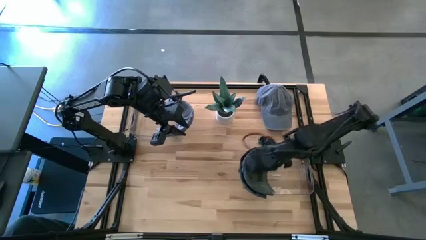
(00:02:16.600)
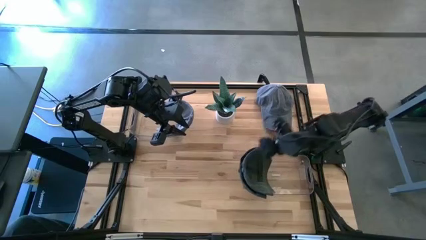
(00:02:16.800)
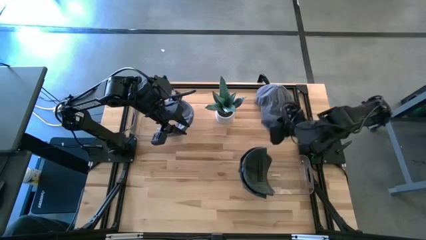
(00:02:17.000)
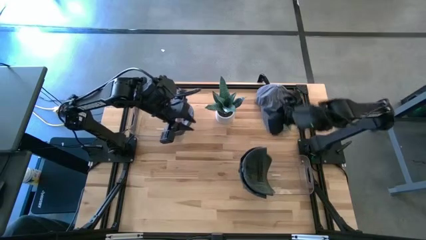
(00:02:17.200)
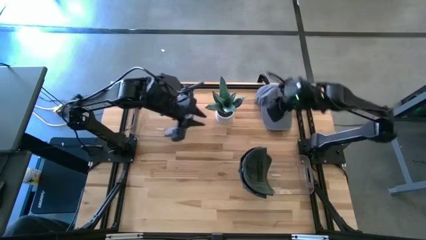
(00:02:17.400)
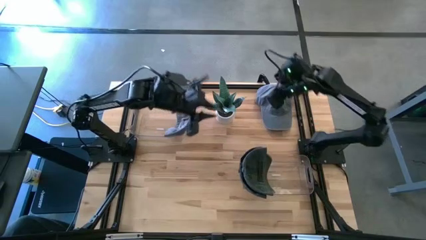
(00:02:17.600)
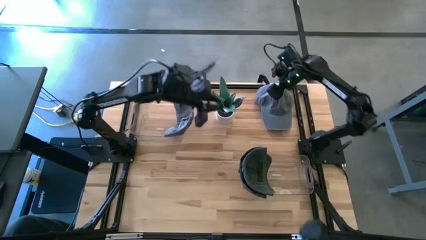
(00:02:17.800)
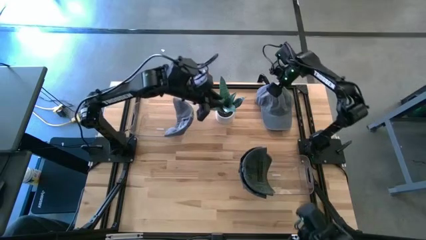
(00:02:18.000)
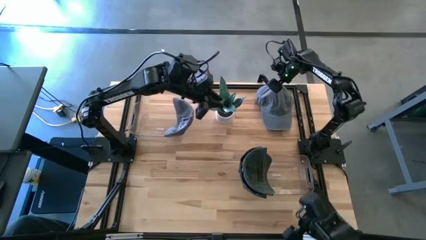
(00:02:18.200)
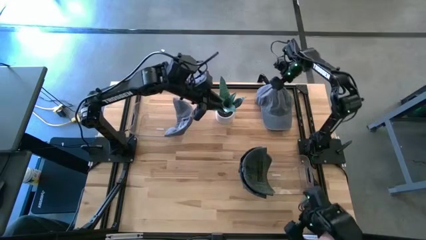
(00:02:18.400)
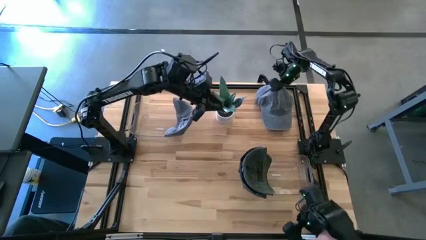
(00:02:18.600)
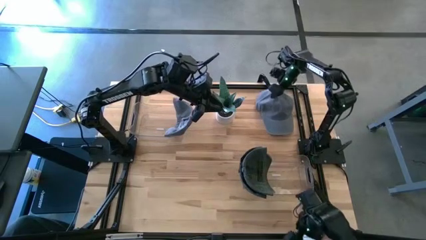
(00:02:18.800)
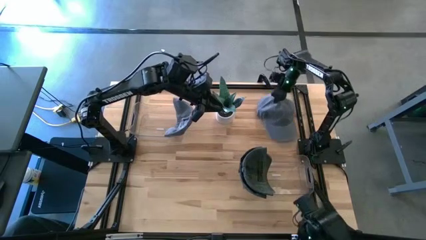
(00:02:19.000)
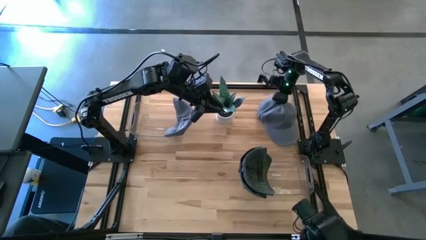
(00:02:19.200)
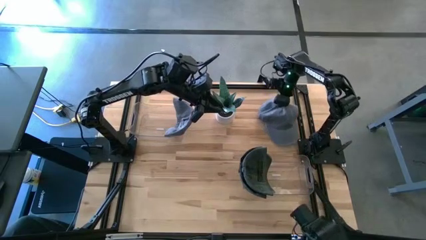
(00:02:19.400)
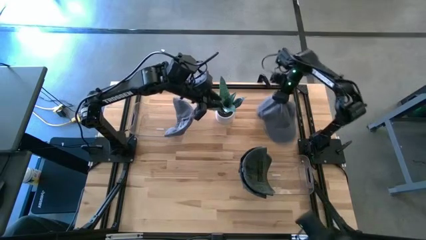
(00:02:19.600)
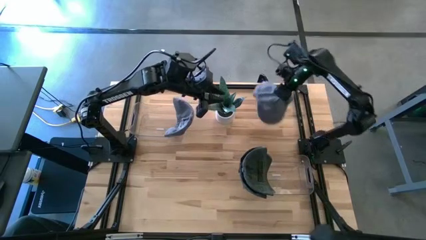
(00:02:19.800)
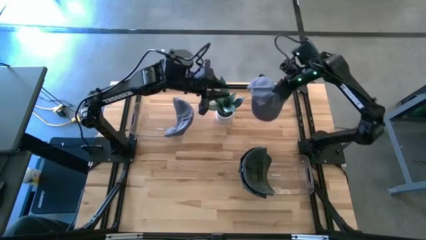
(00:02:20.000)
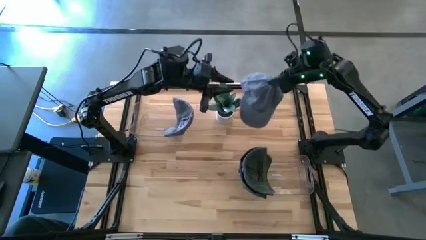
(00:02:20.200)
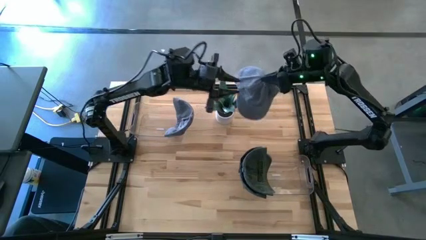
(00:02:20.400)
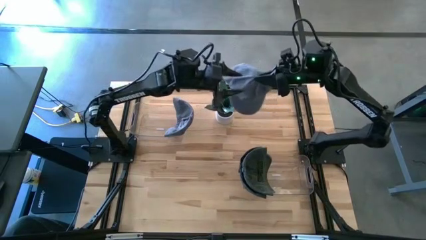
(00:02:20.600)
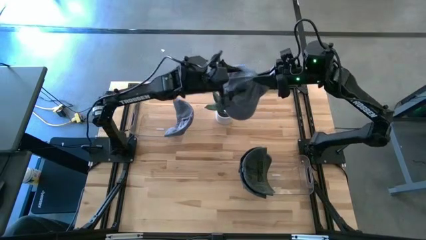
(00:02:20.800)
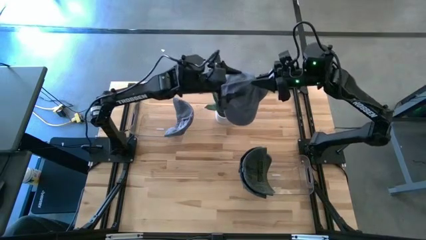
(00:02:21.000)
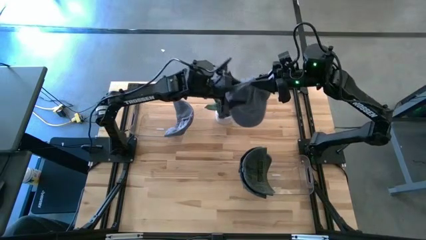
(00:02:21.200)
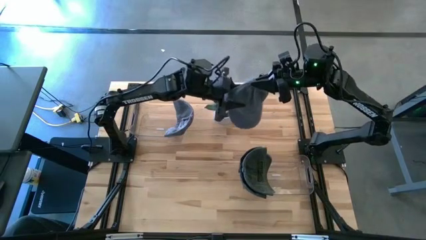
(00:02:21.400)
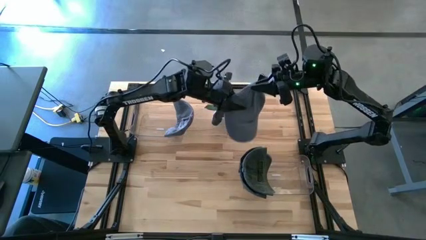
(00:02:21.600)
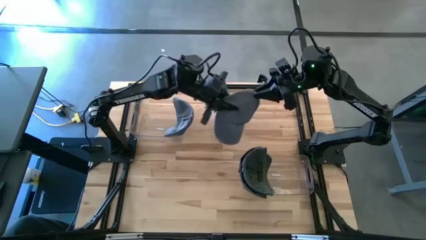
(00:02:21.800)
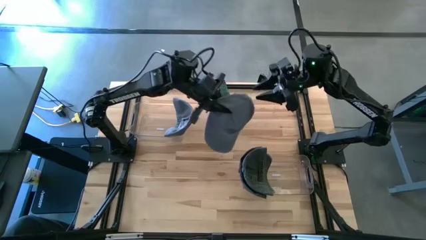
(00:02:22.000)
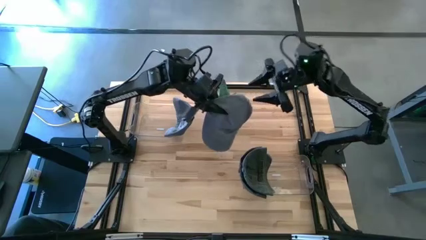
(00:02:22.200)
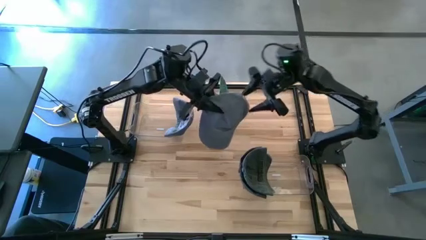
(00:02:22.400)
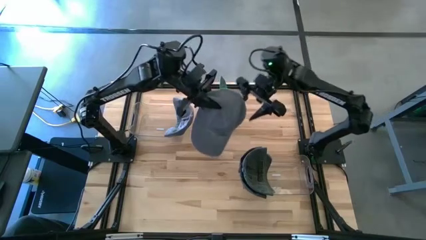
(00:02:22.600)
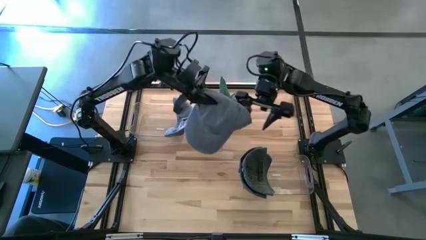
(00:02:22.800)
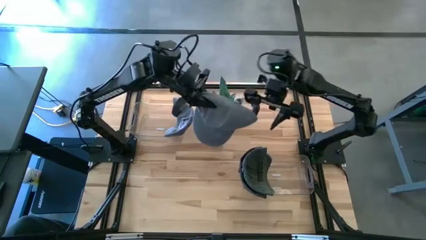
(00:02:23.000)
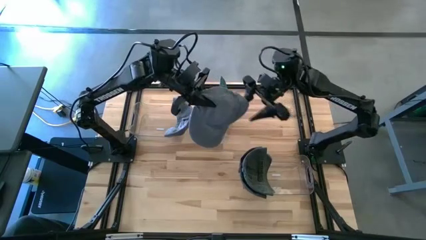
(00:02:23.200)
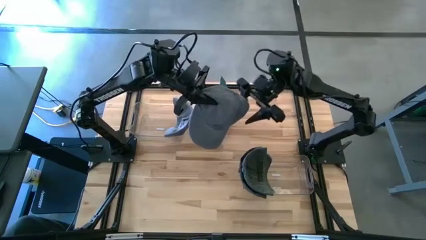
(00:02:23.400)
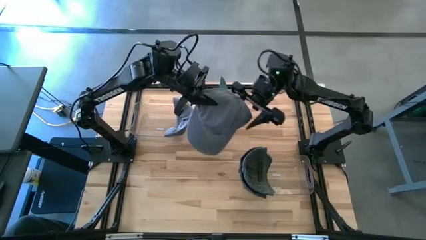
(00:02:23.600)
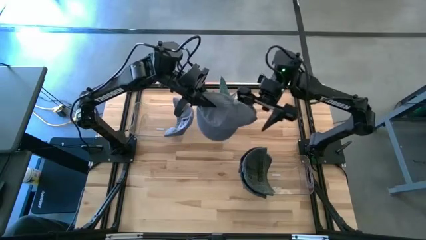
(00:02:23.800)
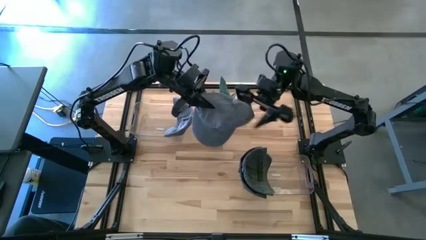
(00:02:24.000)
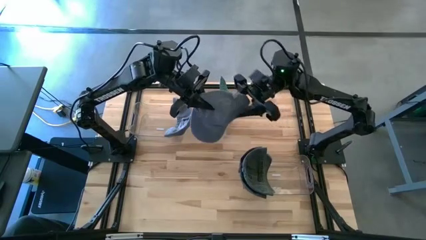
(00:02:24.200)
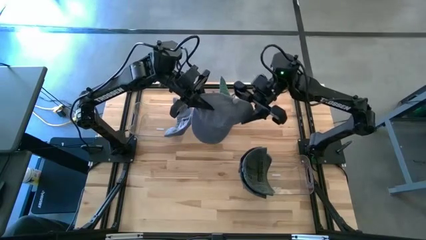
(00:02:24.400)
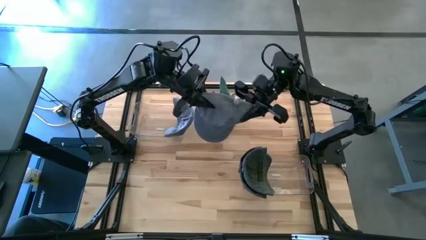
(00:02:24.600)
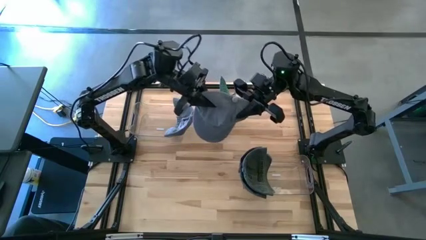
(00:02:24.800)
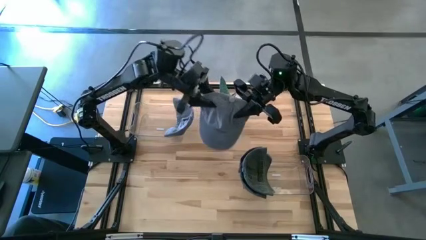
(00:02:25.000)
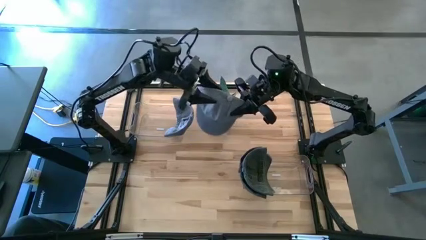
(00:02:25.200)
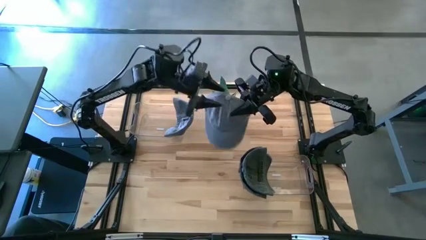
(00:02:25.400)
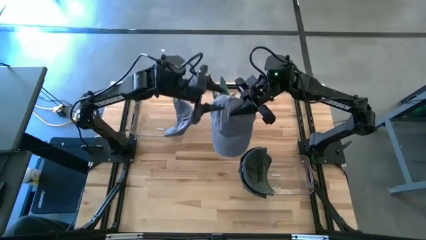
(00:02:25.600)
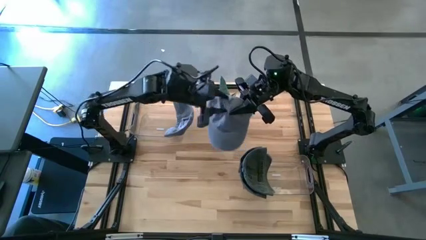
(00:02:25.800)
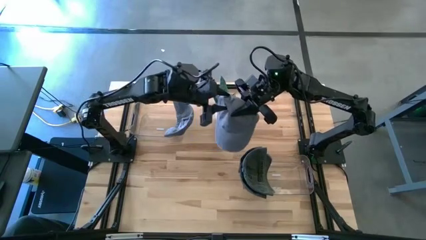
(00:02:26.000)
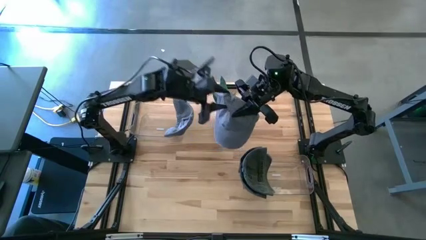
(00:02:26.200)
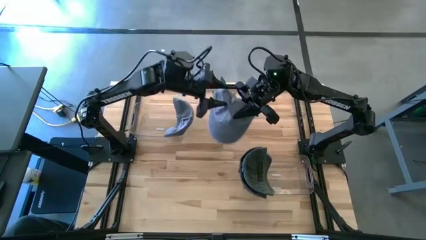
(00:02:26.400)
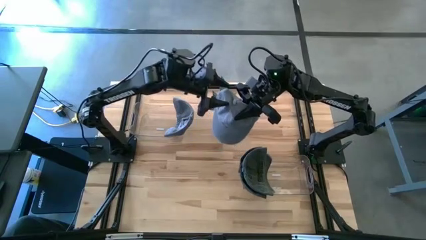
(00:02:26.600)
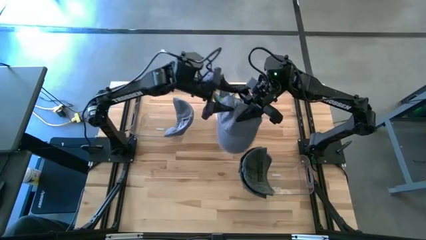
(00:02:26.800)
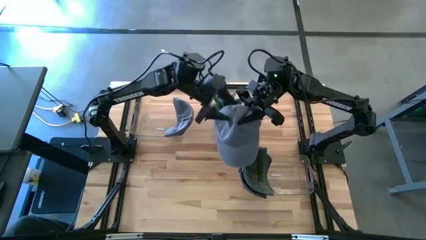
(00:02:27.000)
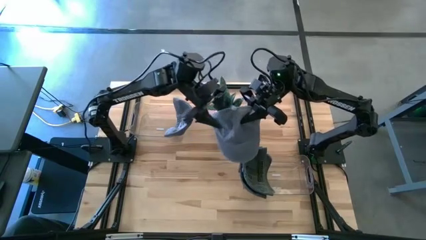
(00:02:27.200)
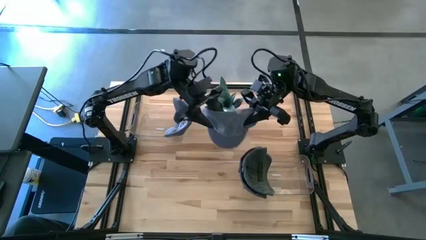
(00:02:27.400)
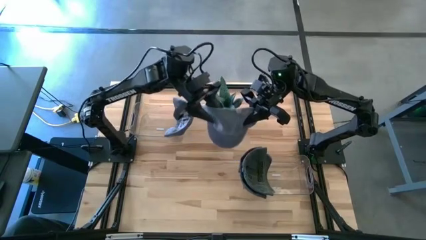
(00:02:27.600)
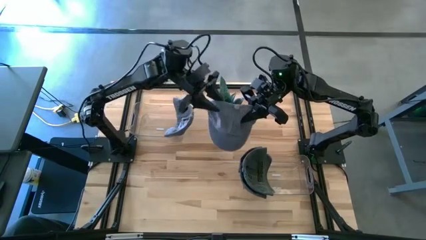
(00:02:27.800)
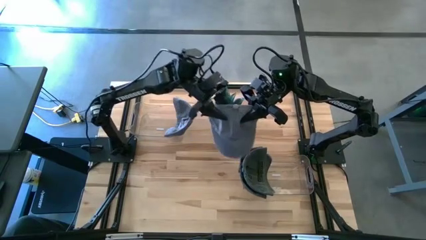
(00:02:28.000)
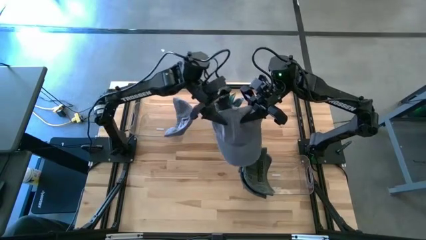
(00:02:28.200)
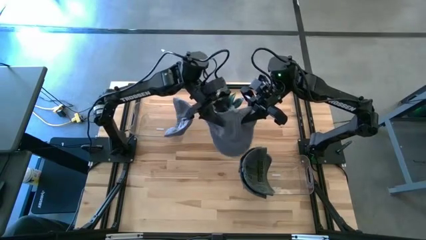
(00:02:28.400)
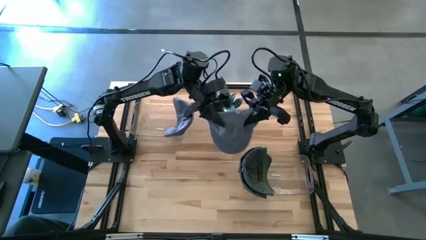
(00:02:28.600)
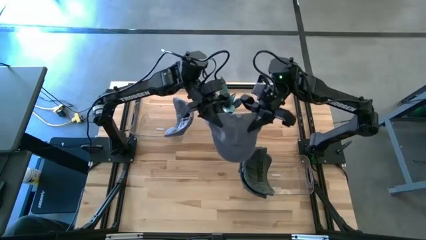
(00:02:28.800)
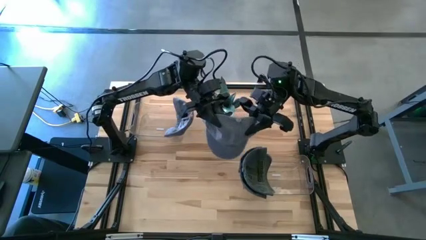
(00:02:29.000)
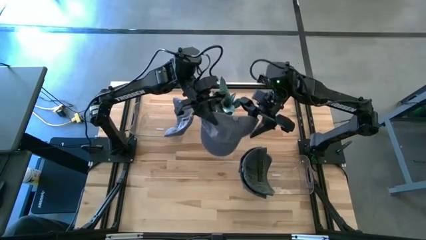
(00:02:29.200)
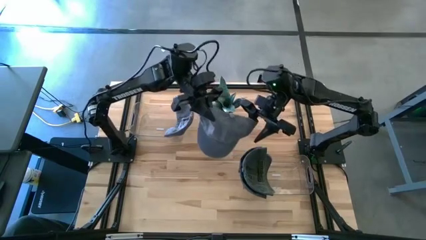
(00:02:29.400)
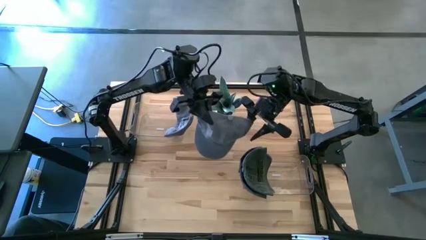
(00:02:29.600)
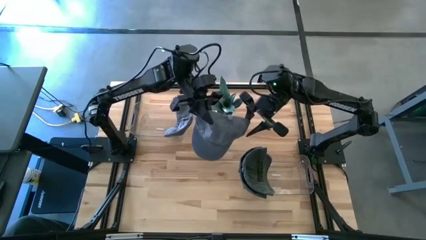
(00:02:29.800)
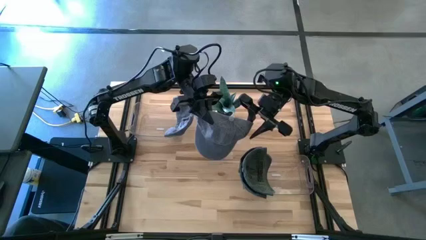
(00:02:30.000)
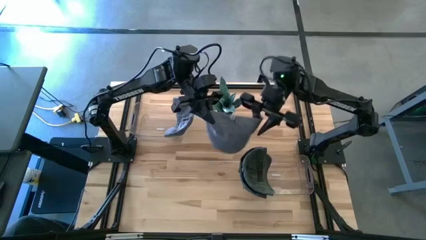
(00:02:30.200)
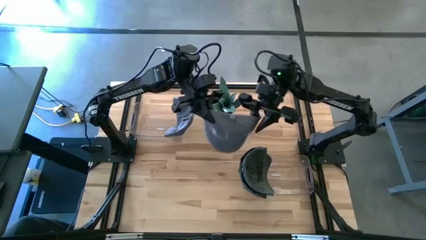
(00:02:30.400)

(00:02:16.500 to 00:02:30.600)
Task: Pick & Place hat
Put the gray cap into the left transparent bin
